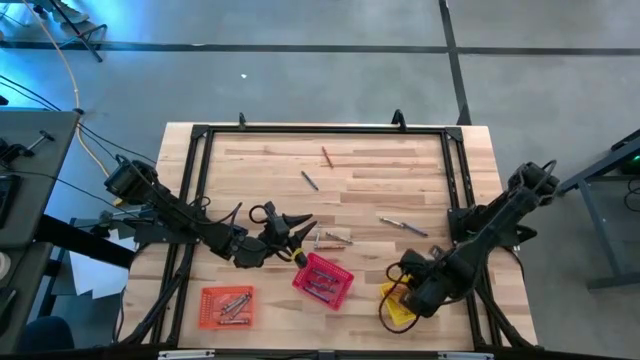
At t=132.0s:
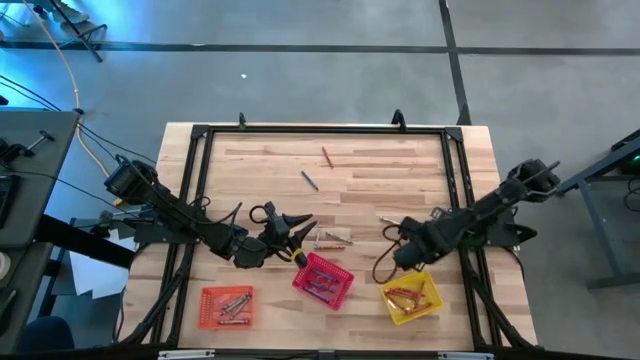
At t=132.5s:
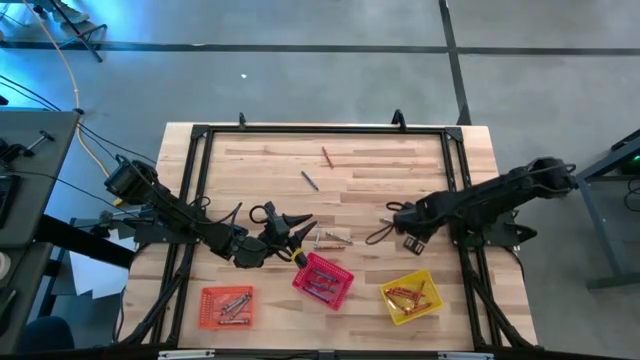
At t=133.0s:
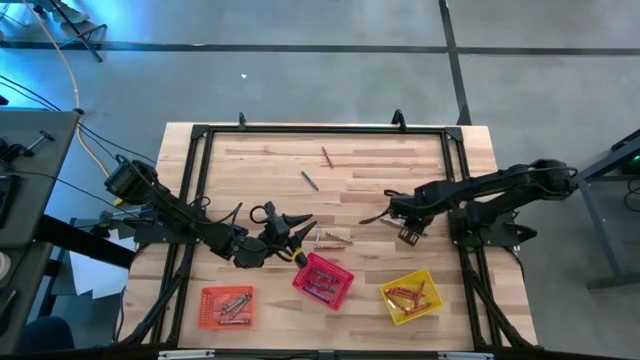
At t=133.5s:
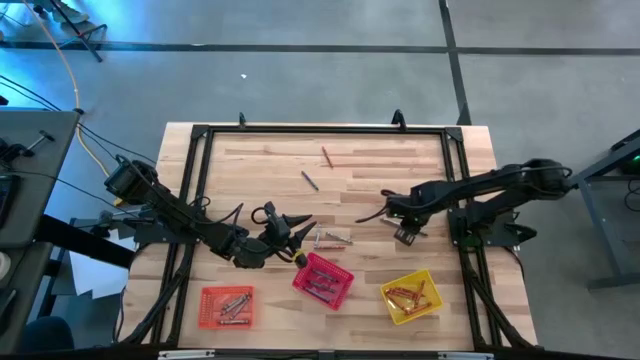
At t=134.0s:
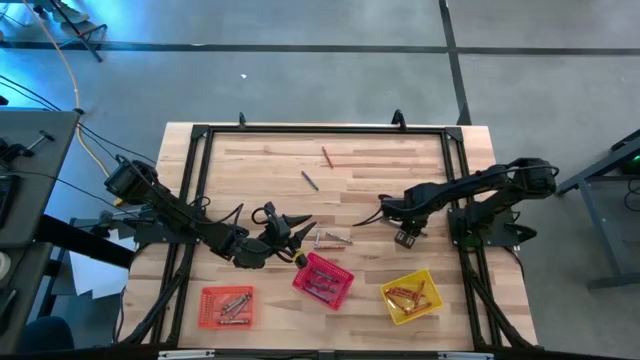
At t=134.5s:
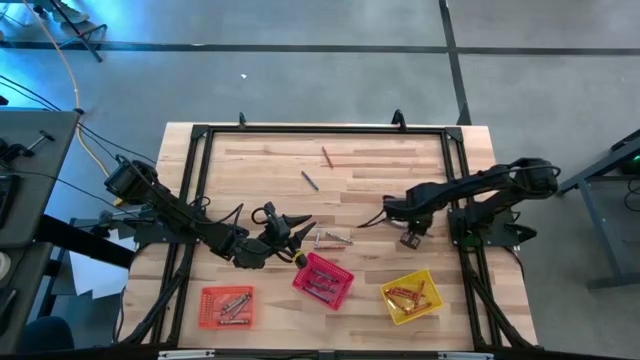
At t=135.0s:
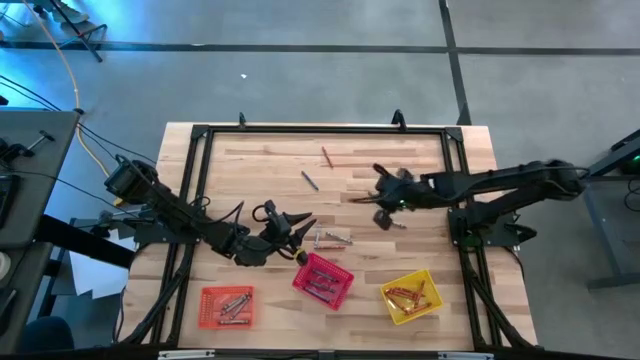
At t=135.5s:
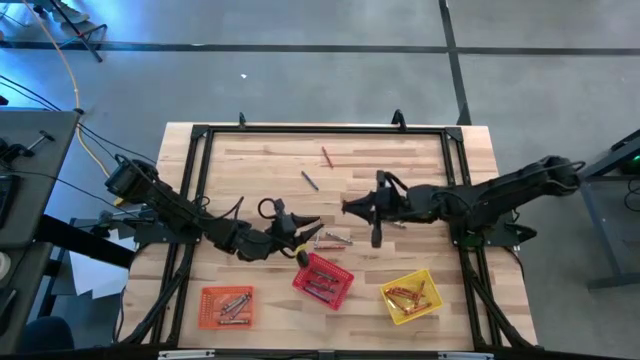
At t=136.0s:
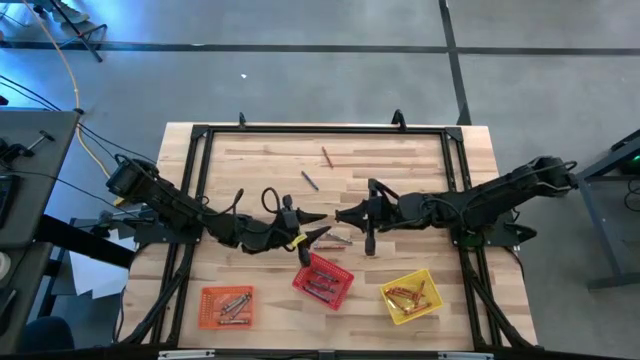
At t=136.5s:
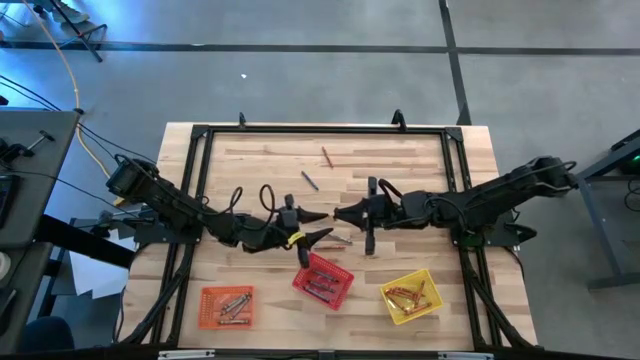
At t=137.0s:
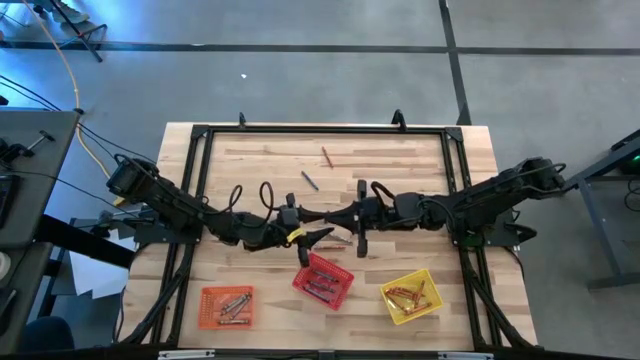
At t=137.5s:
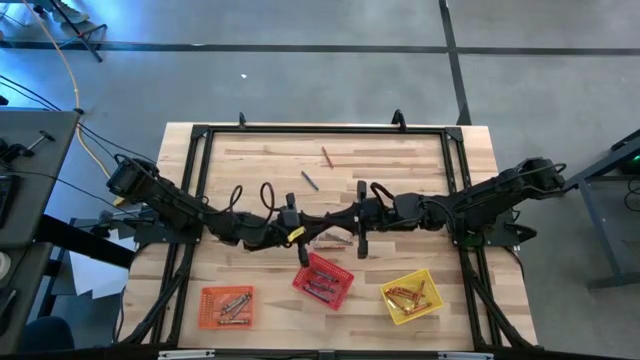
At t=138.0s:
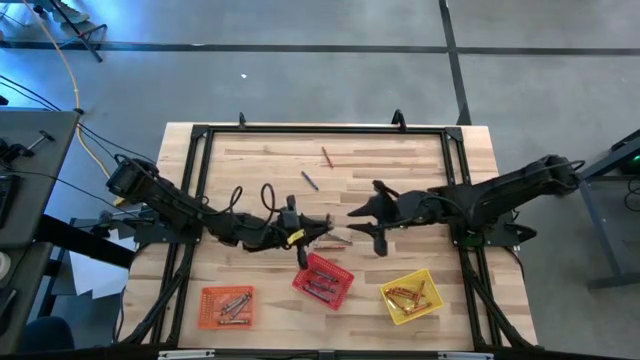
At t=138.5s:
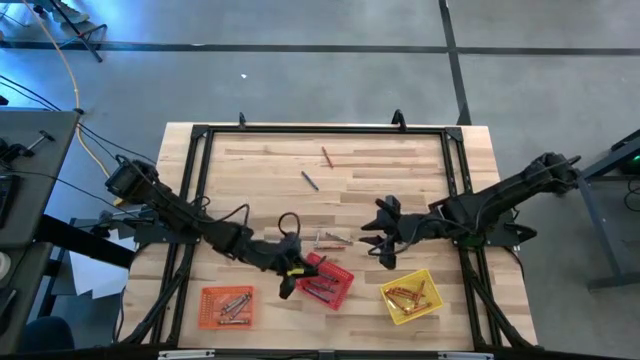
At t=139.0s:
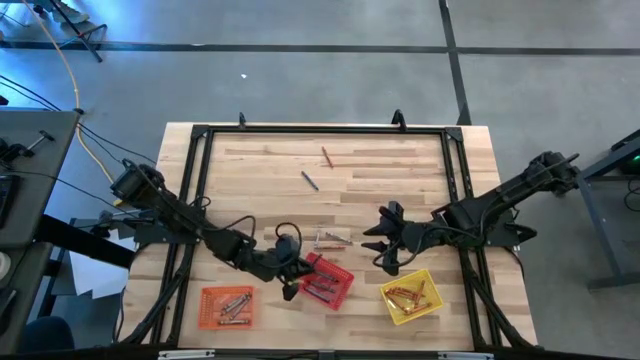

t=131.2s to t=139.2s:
Task: Sort crayons
Put the blue crayon into the red bin

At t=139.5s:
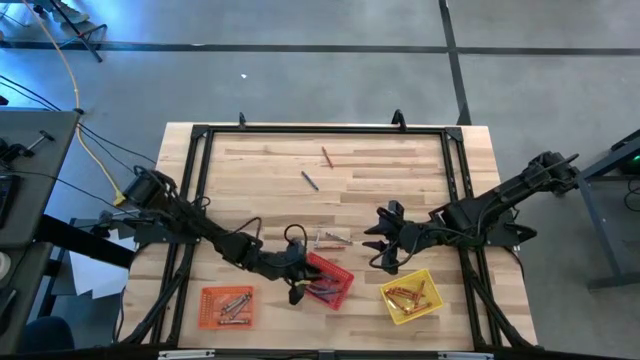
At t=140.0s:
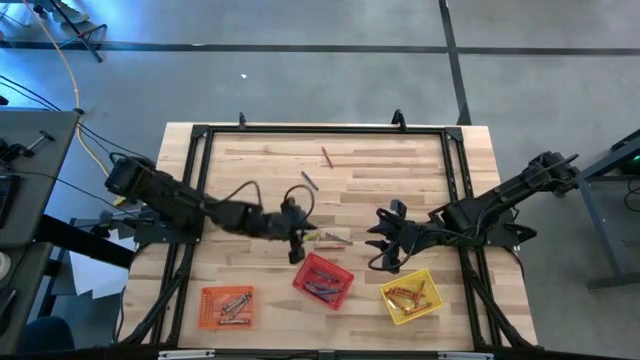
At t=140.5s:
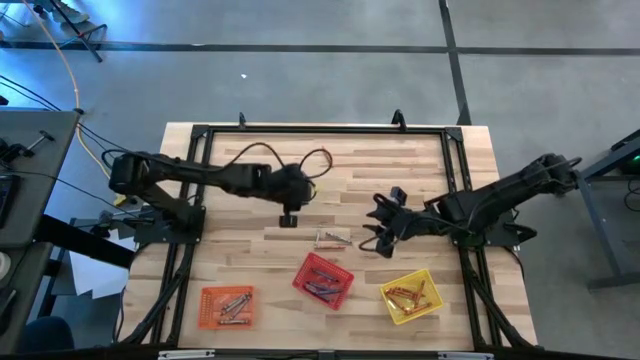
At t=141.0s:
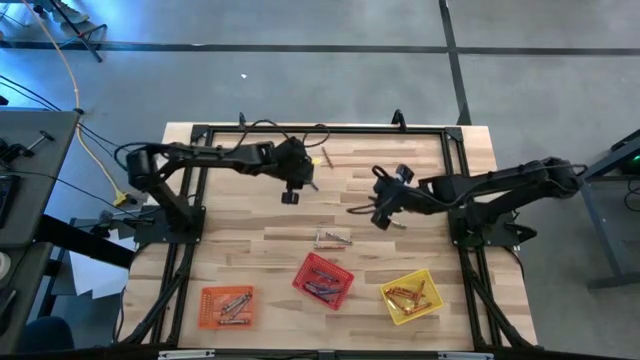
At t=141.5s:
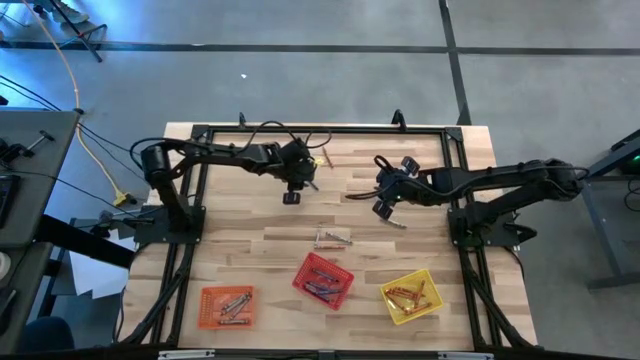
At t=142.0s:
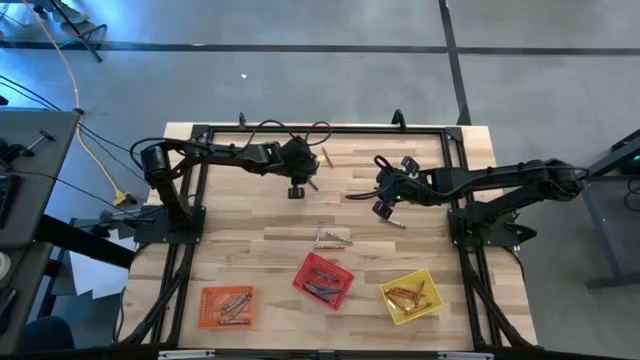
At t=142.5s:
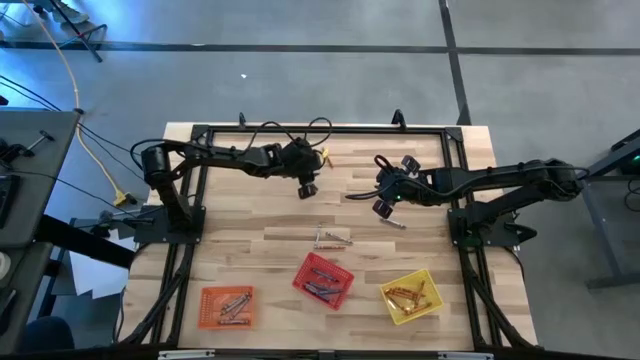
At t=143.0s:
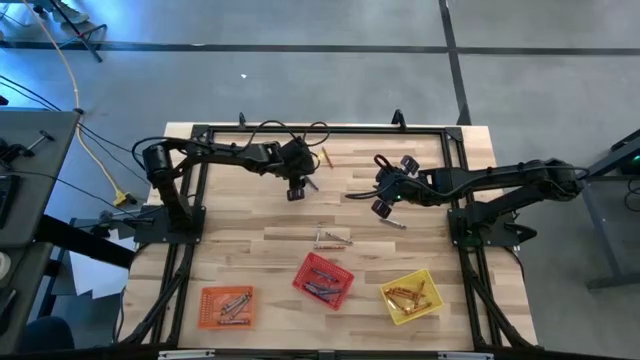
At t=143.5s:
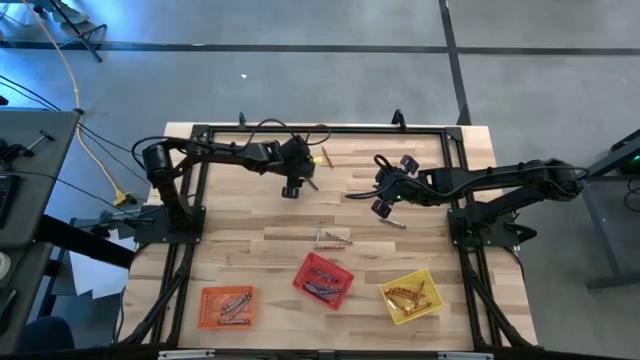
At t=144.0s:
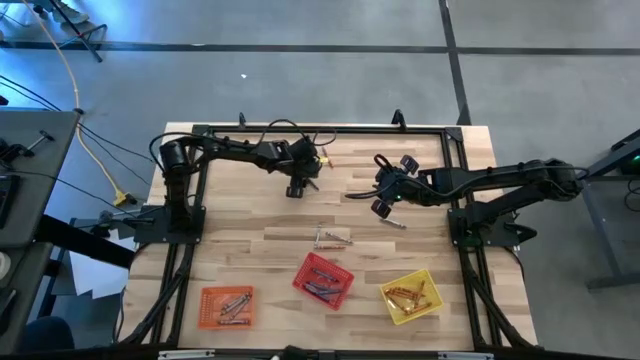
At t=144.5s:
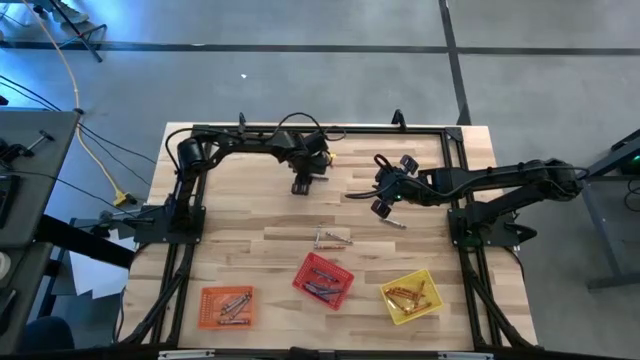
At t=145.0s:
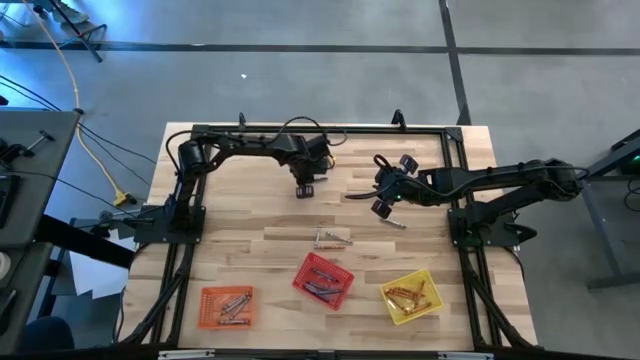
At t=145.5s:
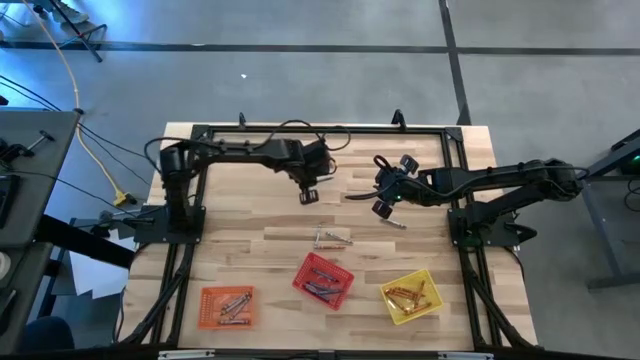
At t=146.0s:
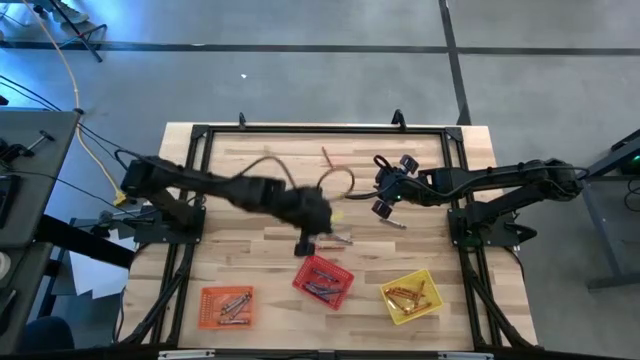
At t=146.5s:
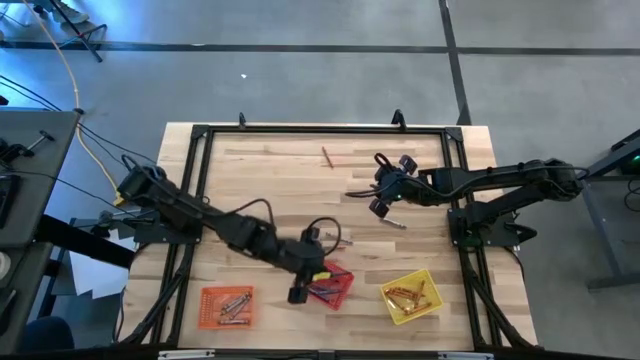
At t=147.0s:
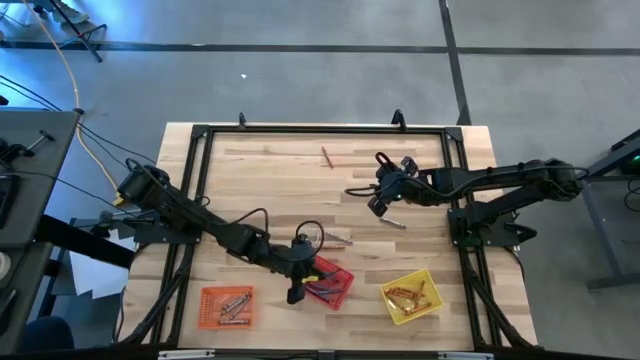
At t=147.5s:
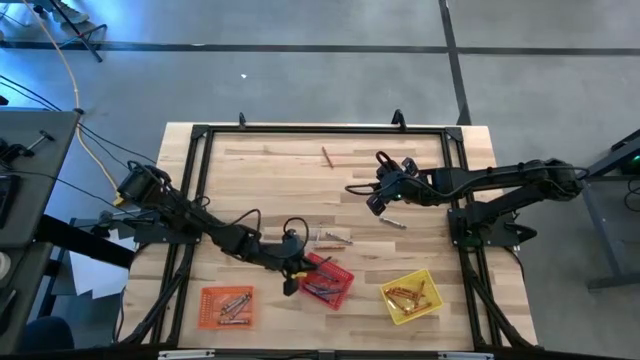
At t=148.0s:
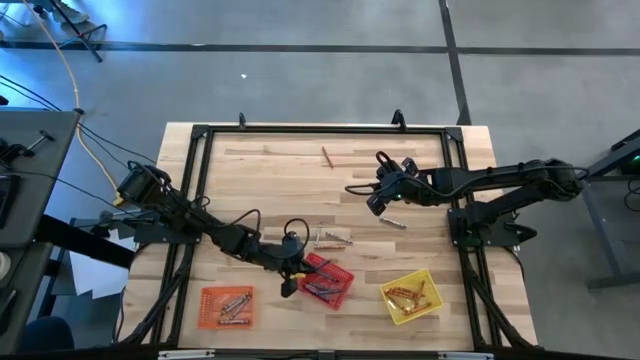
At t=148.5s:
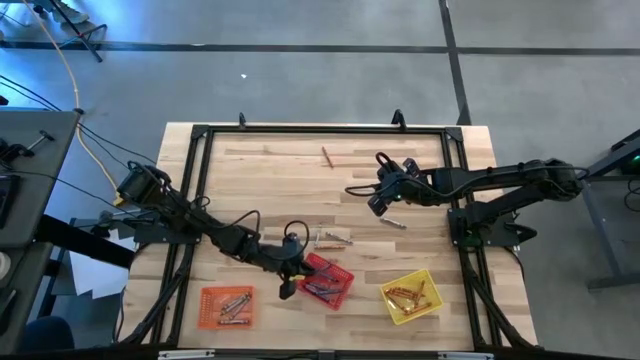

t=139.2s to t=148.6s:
Put the blue crayon into the red bin
